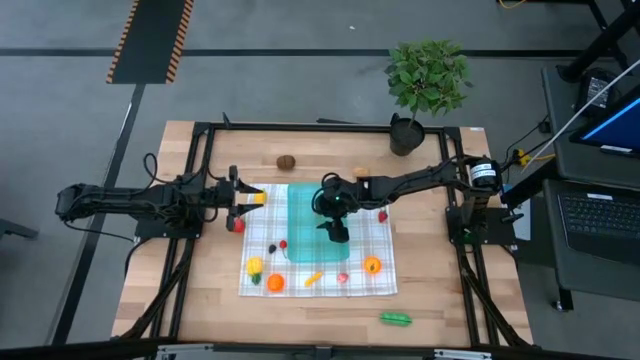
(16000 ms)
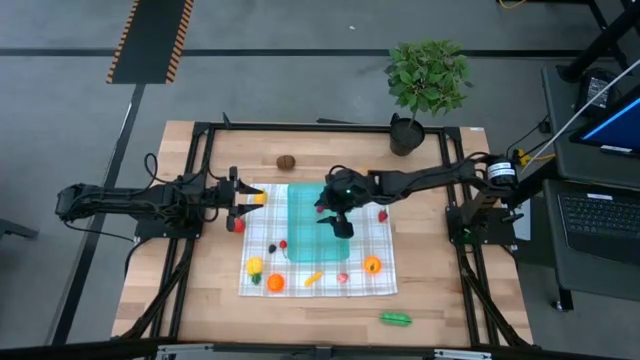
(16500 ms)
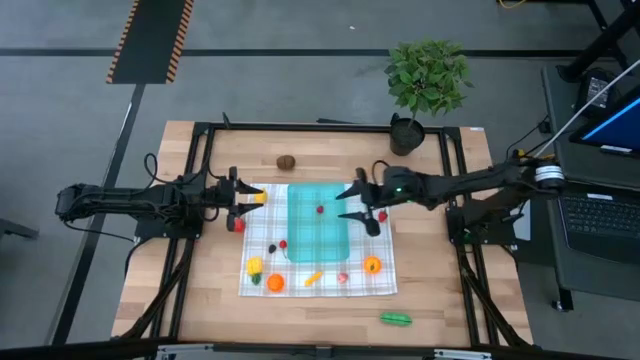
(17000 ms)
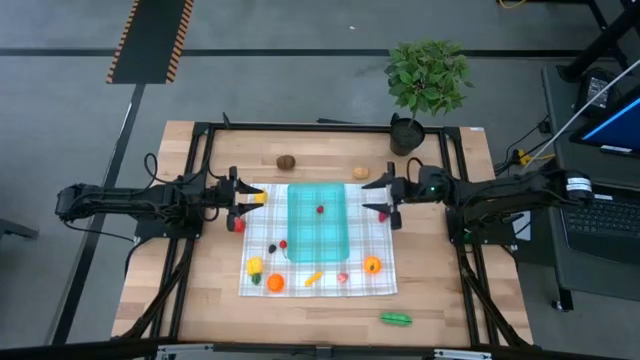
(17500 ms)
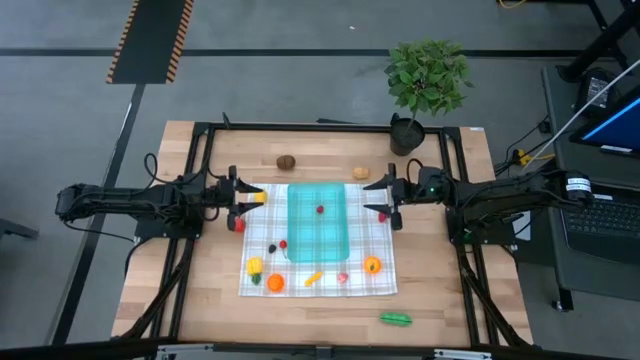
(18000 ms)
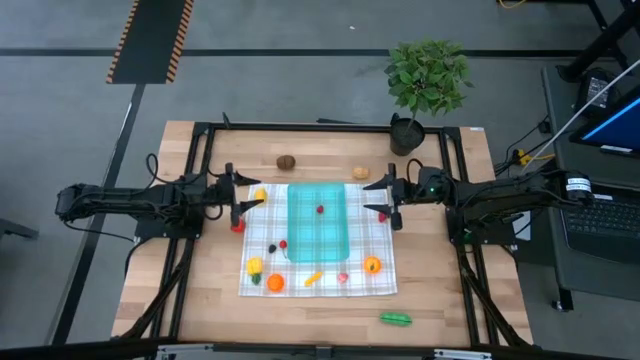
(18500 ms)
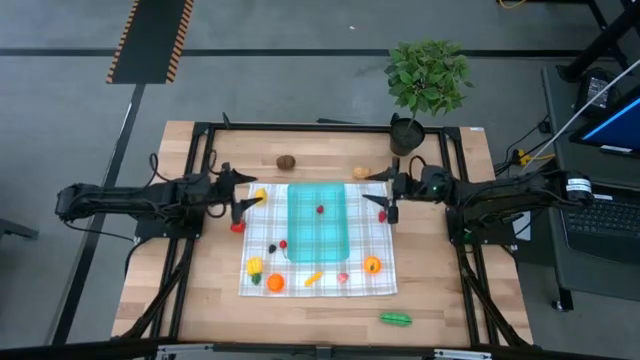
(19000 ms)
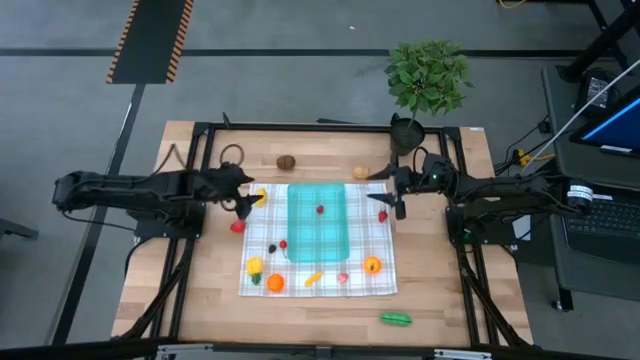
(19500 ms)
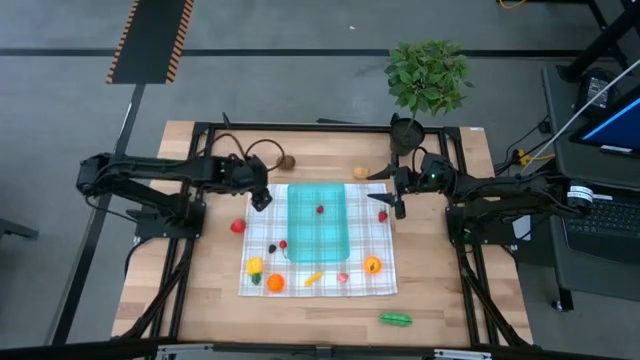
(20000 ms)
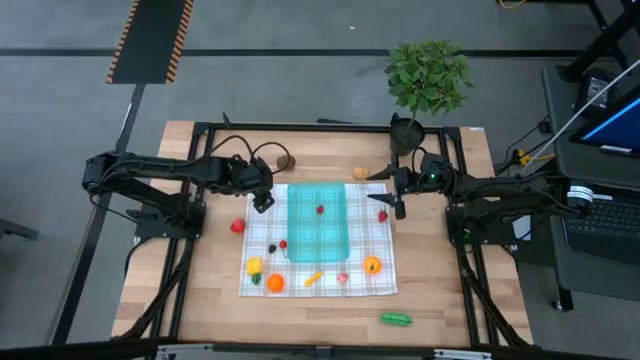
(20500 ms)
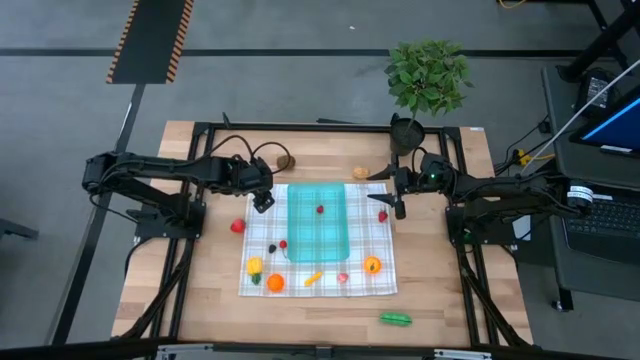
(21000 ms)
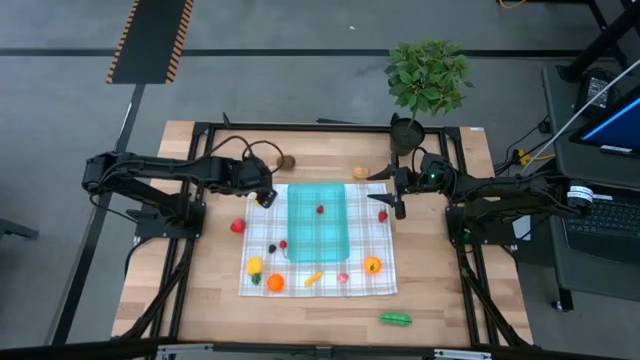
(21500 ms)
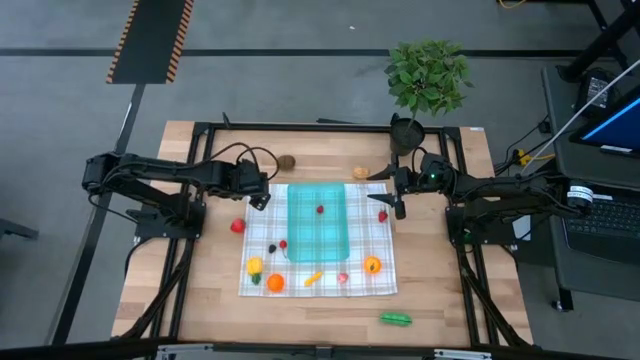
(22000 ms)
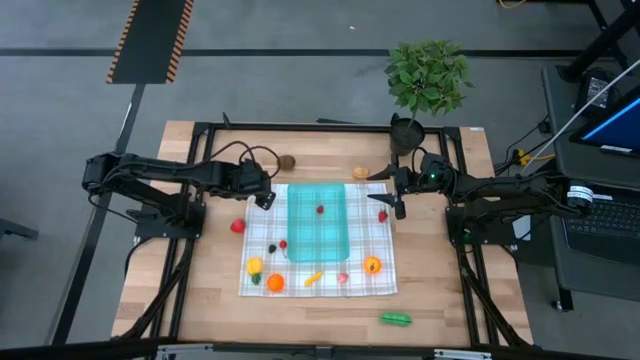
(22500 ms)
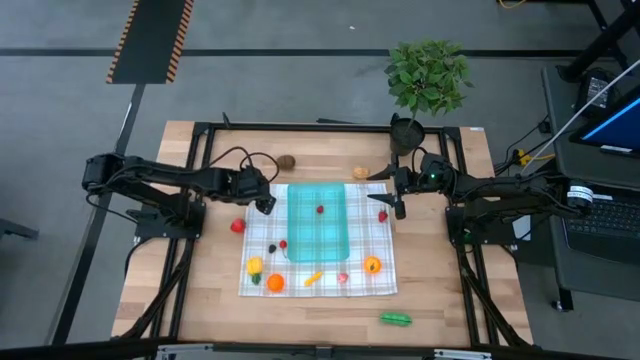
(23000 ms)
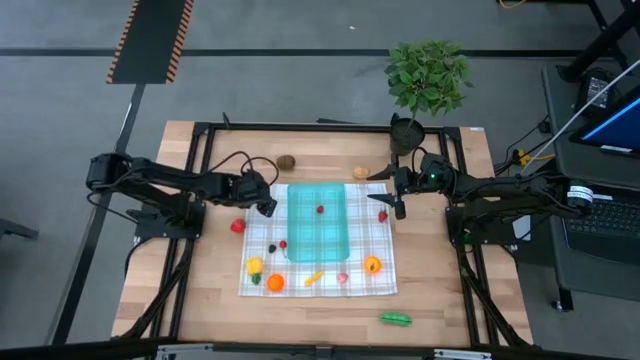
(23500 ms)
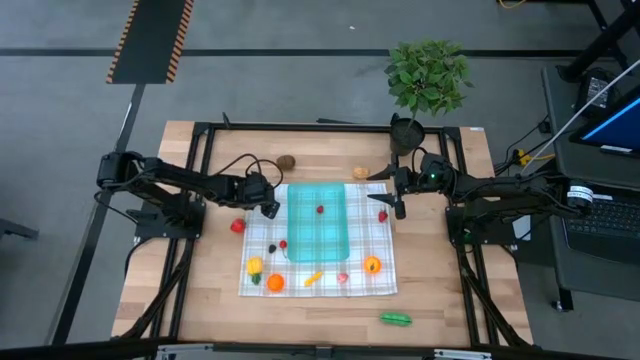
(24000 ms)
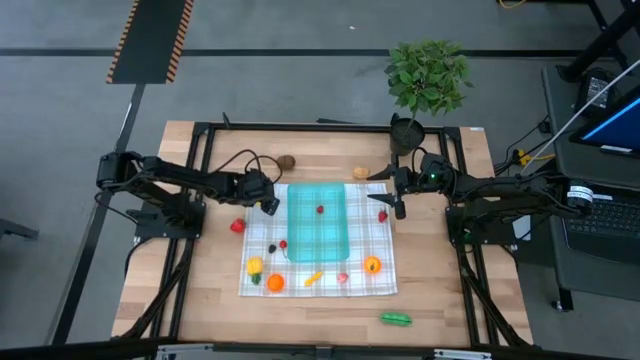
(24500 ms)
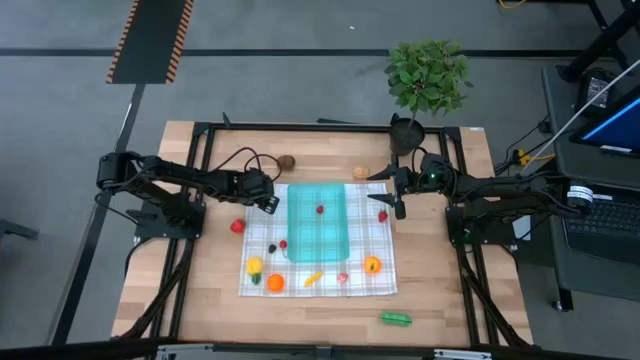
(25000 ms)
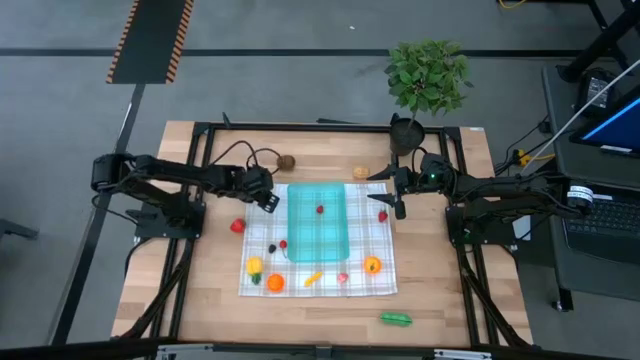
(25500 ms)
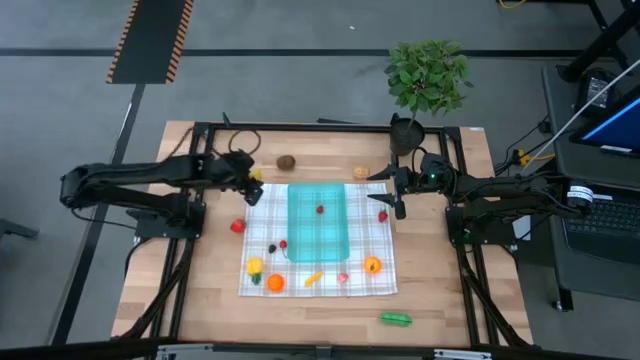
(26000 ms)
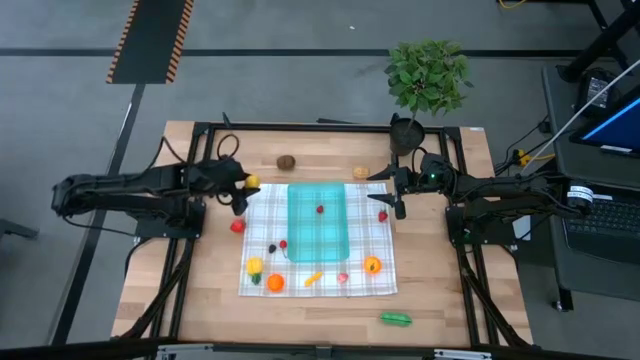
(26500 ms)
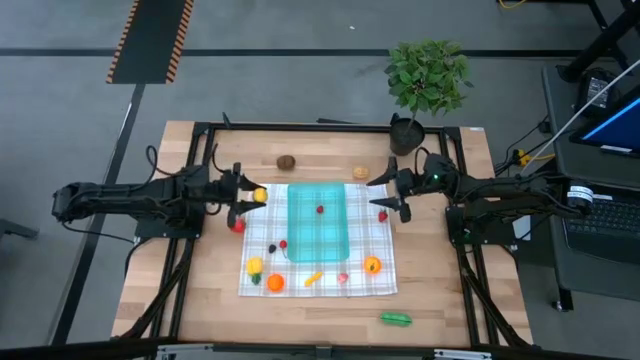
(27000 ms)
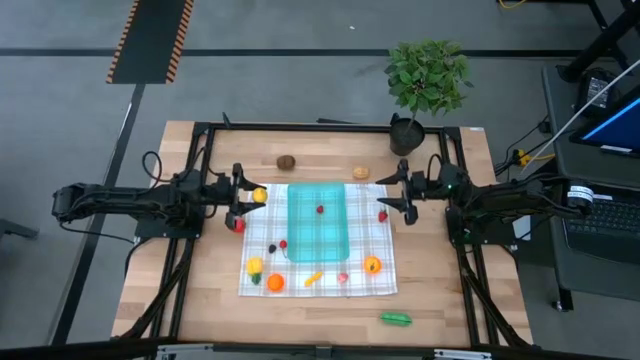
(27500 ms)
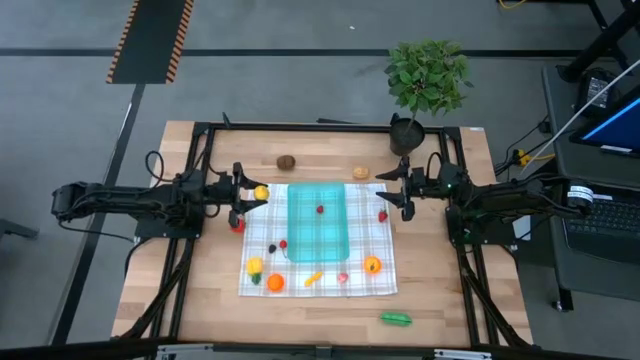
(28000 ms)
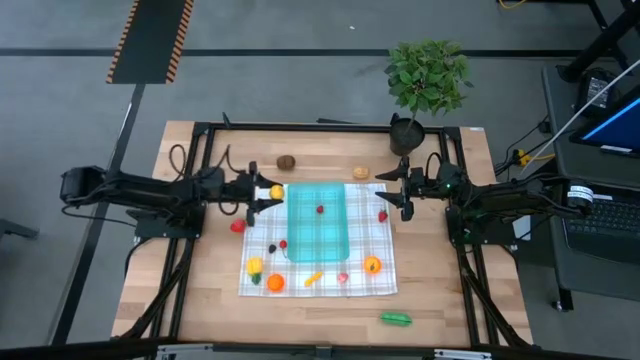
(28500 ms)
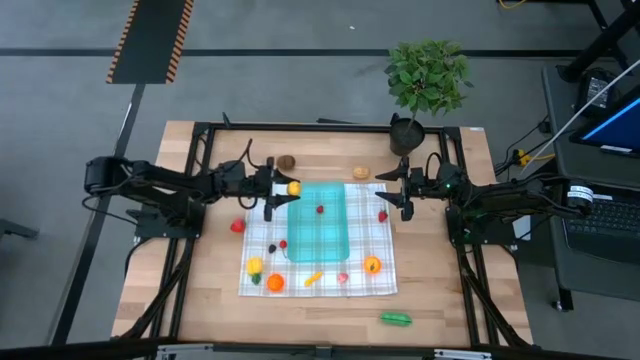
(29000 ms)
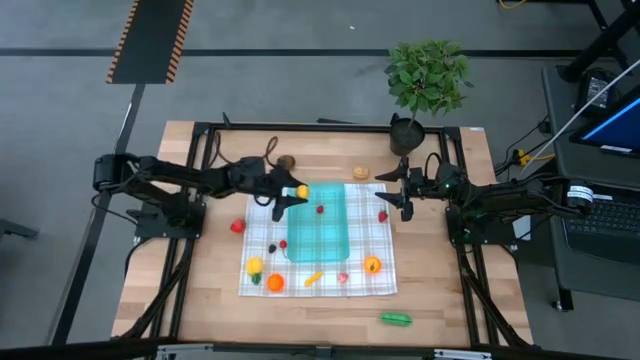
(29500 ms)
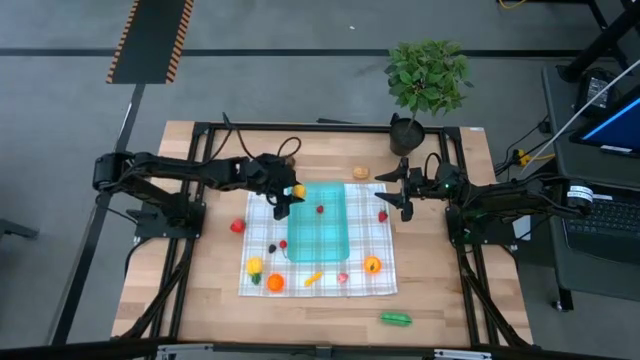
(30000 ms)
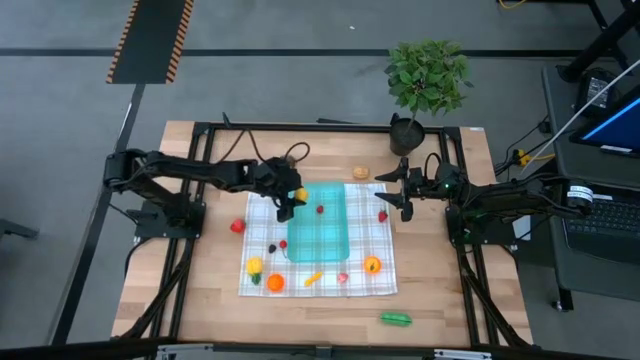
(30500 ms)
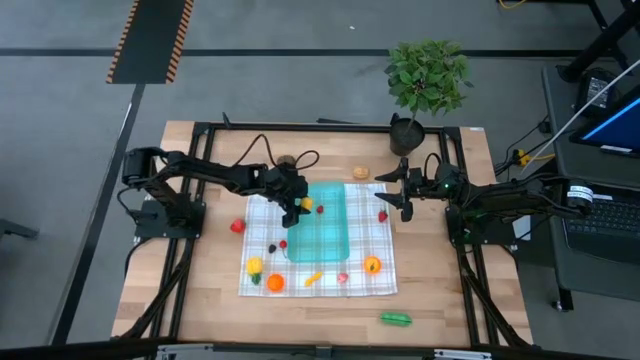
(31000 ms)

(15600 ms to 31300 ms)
Task: Pick and placing Produce into tupperware
Put the lemon into the blue bin

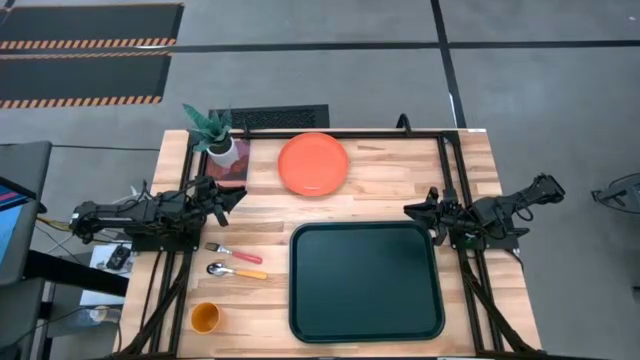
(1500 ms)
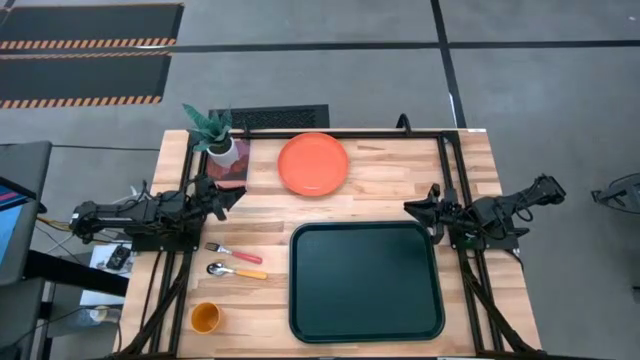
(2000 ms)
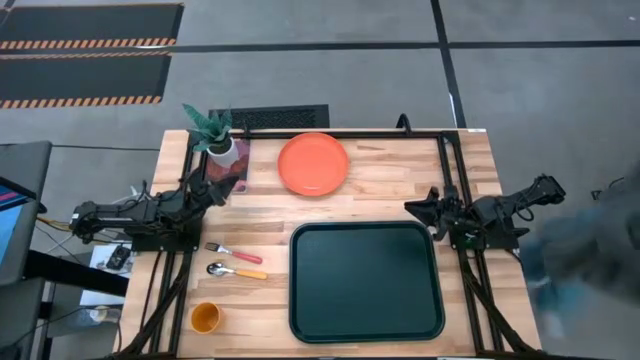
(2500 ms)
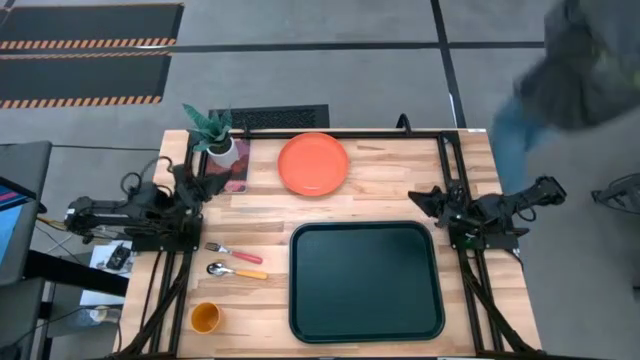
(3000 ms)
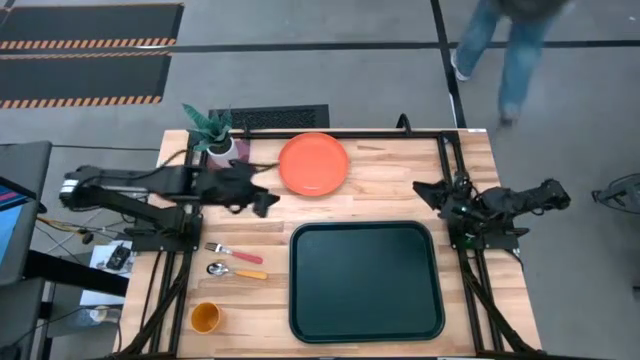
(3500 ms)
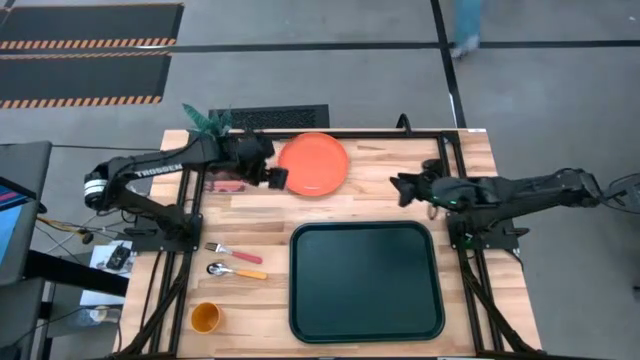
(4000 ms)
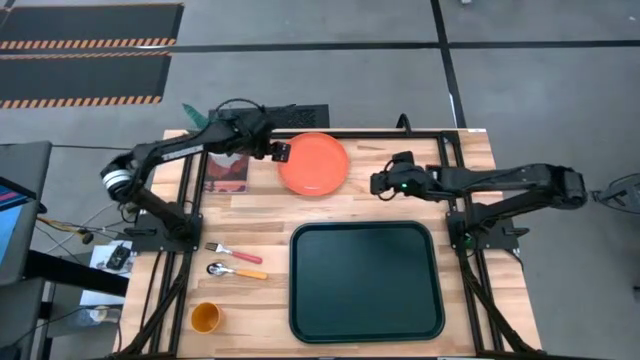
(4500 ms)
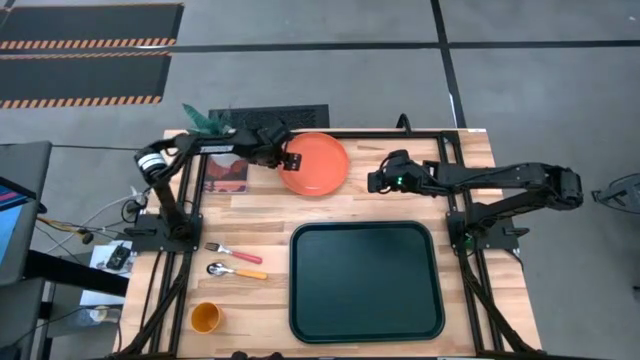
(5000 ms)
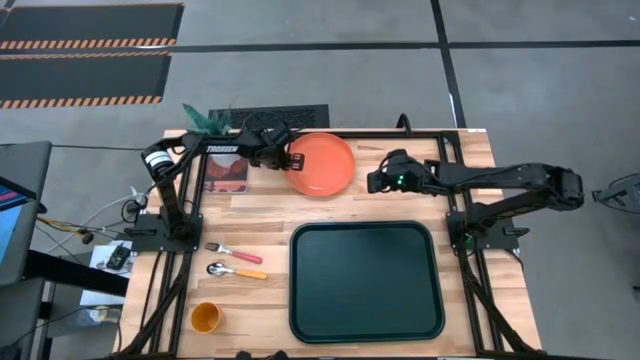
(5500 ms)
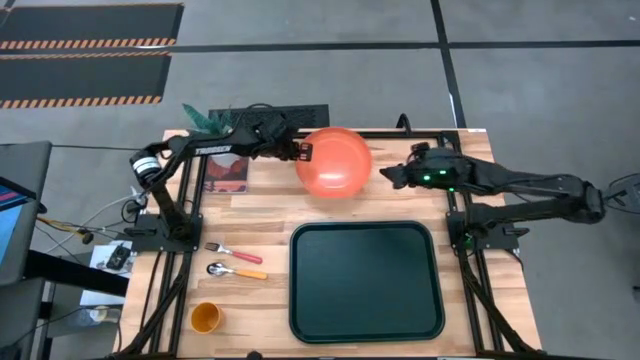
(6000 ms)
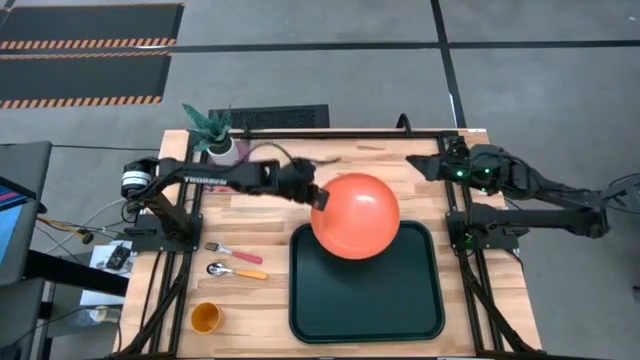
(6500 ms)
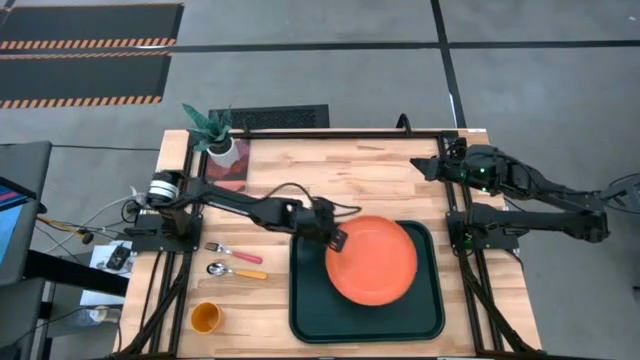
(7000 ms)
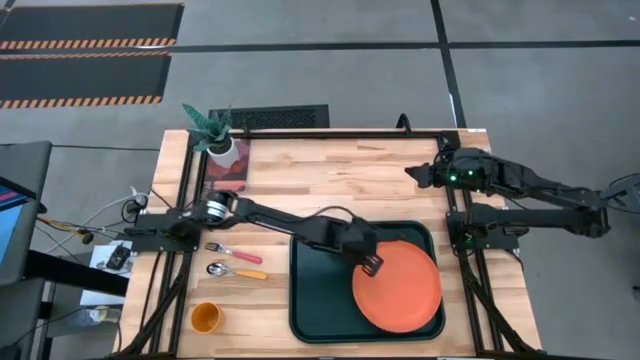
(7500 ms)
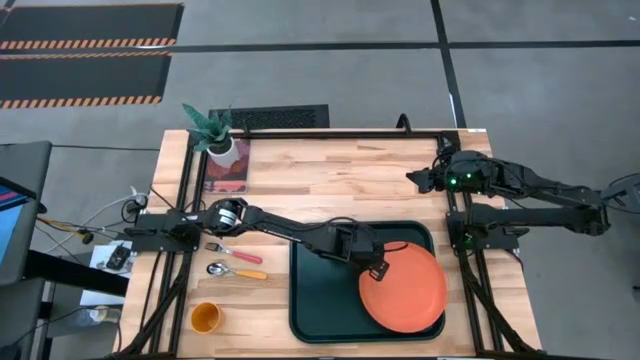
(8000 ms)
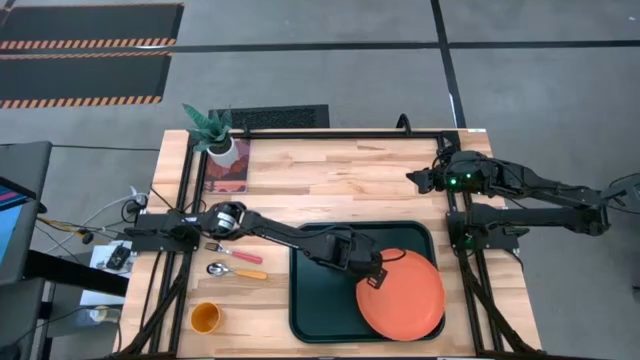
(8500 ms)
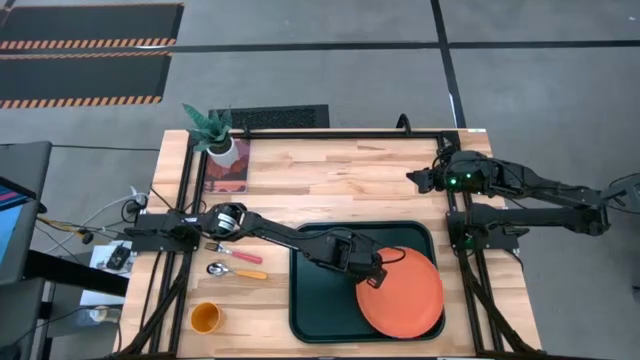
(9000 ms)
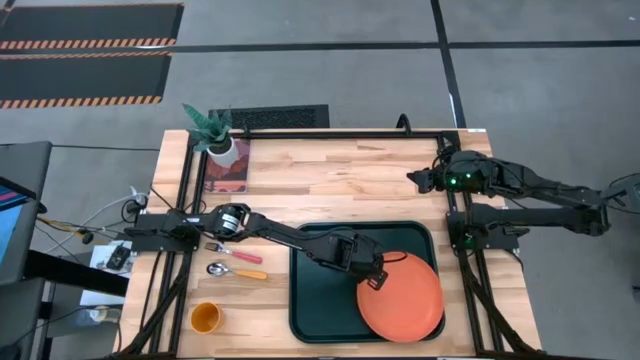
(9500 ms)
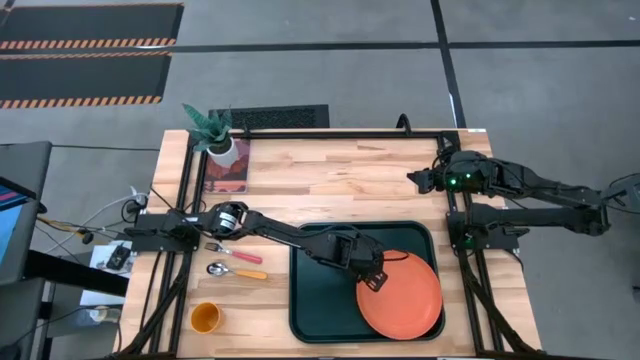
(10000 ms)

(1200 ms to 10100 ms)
Task: Pick and place plate/cup/fork/spoon on tray
Put the orange plate on the black tray
